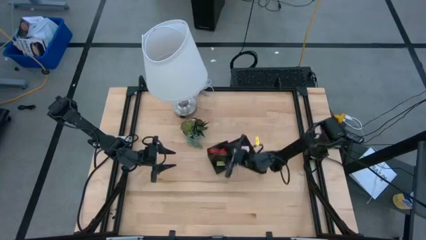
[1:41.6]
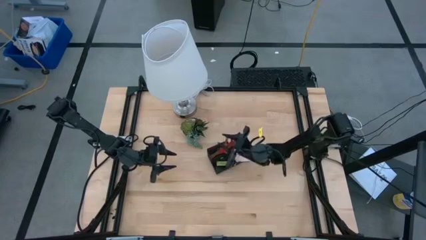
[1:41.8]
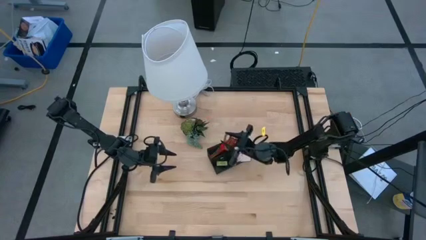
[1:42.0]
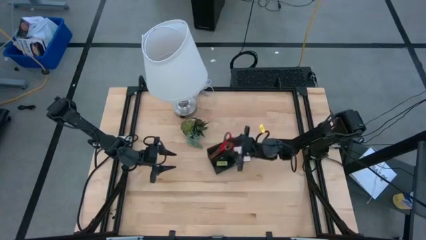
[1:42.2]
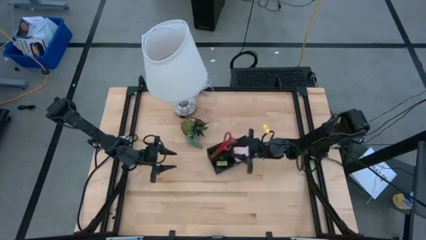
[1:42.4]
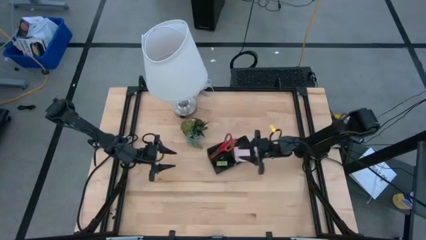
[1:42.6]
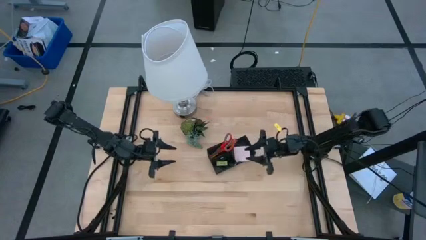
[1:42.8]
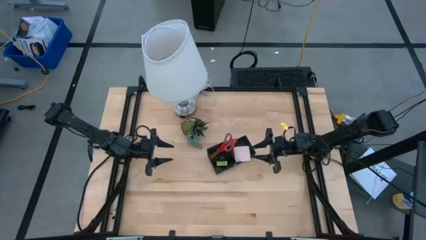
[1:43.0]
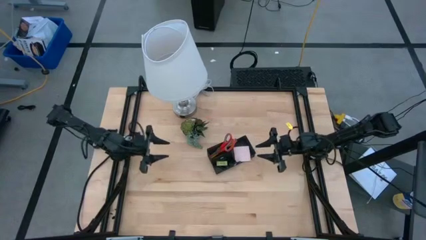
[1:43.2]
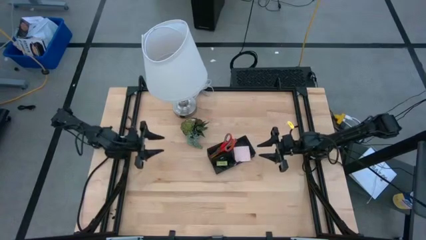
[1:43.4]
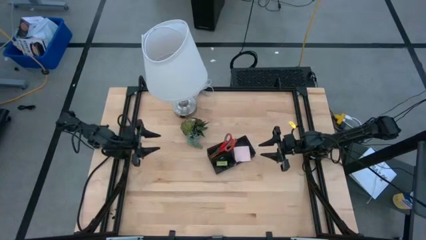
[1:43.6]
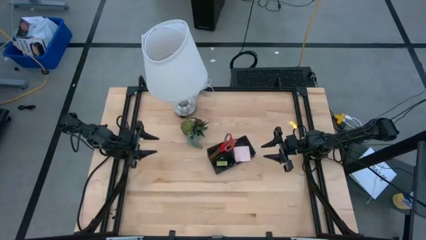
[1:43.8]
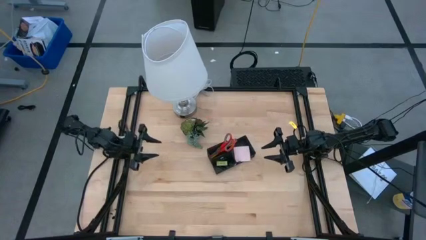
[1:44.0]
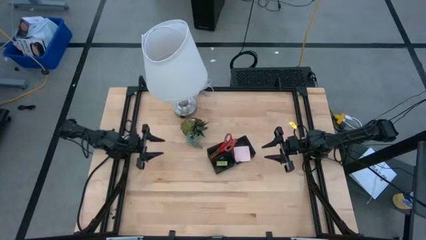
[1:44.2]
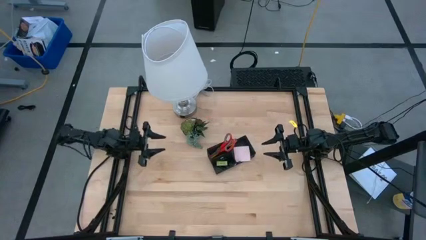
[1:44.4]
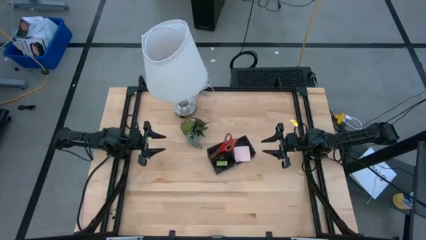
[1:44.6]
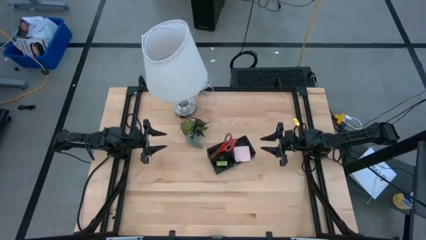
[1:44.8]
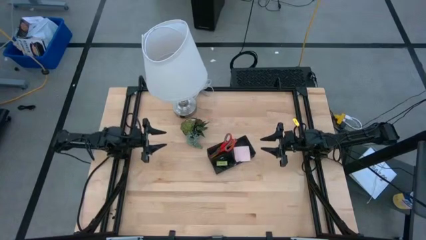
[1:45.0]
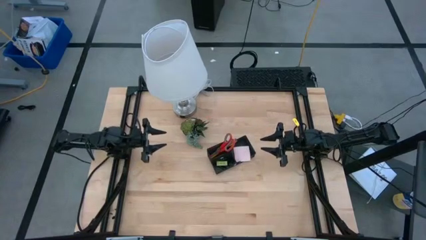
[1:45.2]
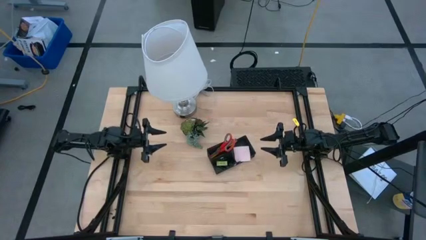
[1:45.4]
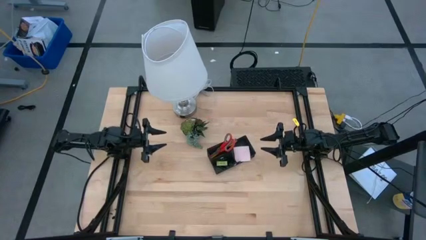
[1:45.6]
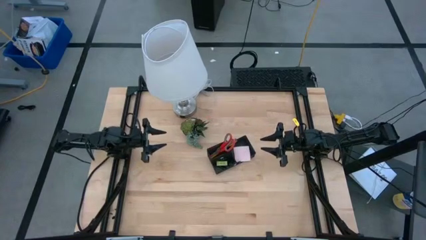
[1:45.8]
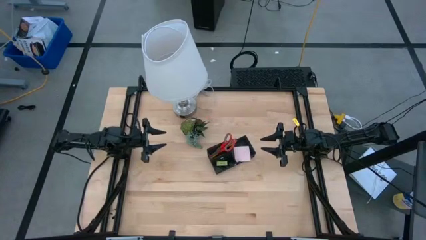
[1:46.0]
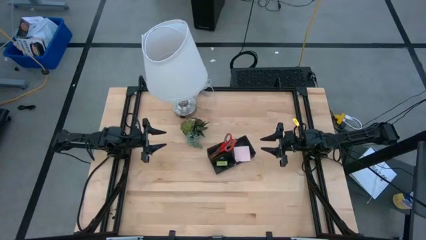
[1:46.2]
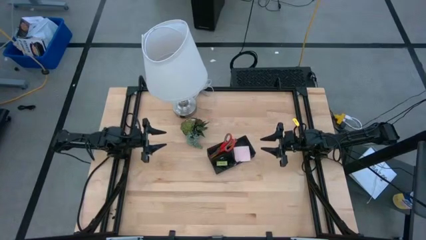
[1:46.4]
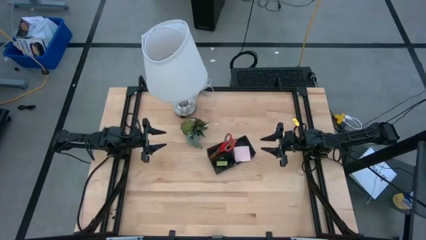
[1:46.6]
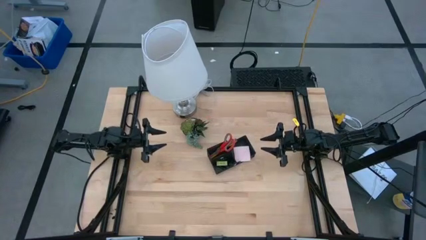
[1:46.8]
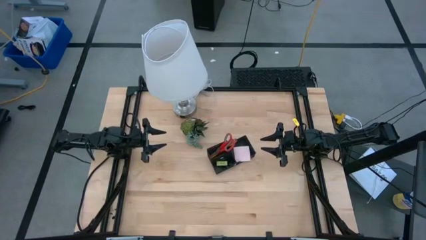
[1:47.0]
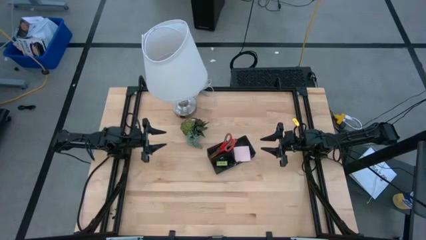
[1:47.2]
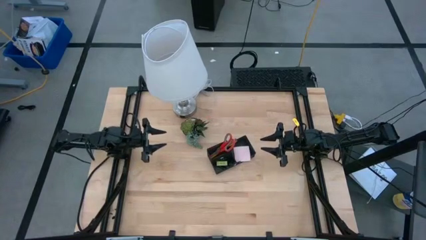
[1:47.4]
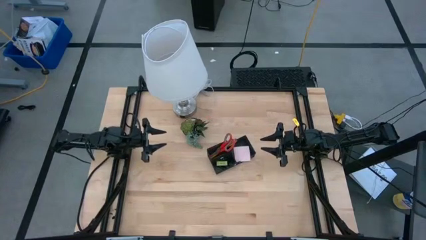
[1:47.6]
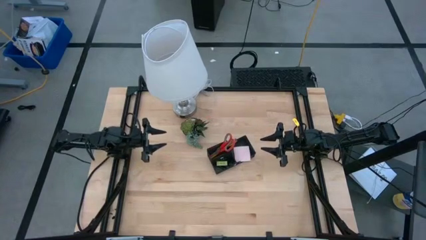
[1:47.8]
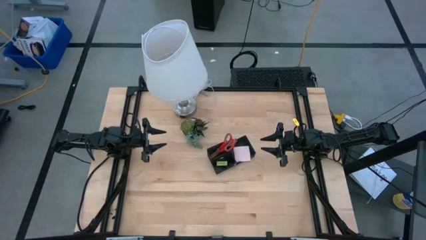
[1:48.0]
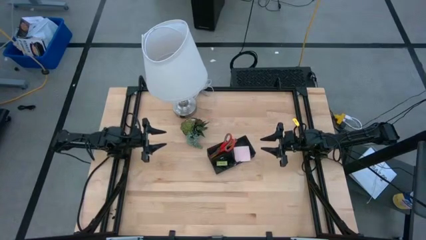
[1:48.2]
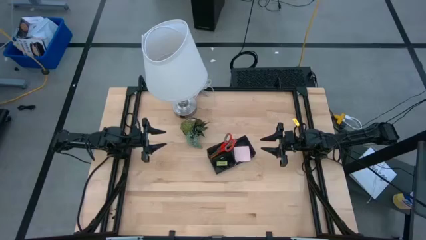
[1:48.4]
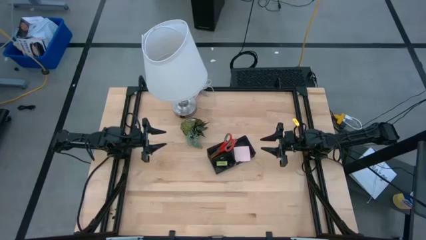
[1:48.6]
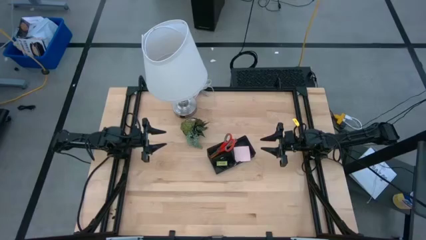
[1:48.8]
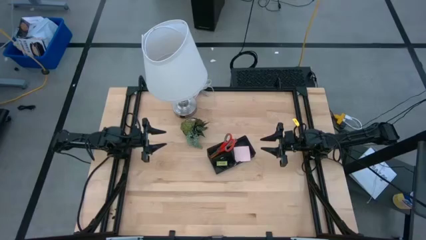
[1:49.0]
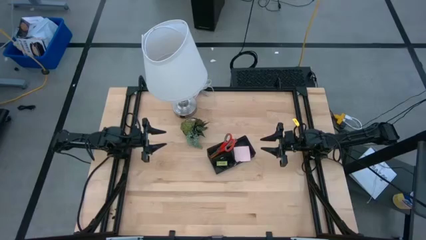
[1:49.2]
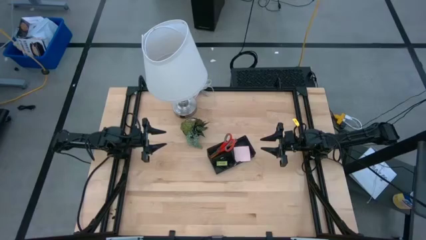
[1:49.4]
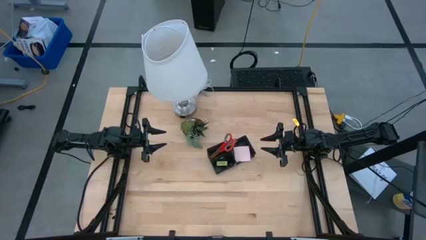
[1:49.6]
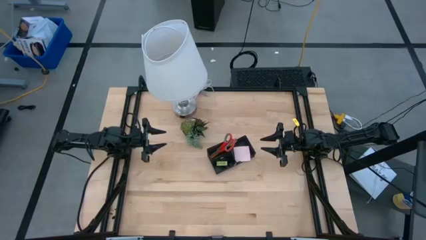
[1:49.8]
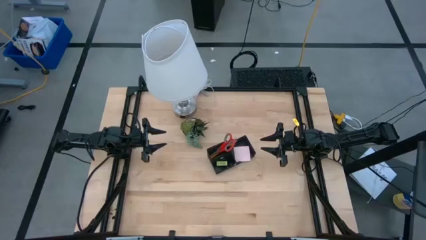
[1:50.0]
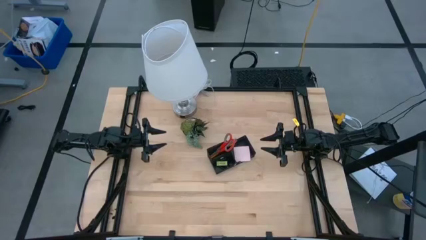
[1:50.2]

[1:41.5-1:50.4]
Task: Pick and place office supplies into organizer
Return to Home Position

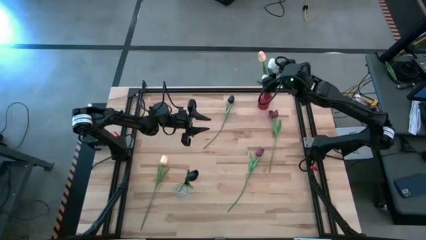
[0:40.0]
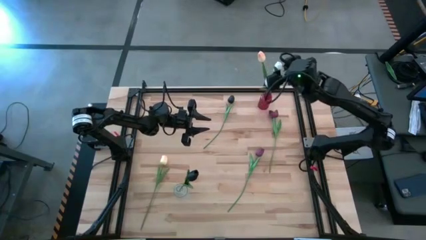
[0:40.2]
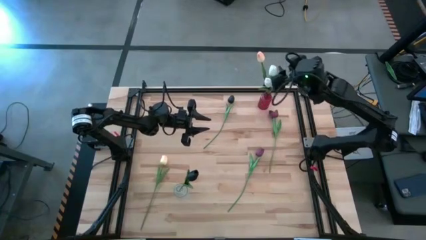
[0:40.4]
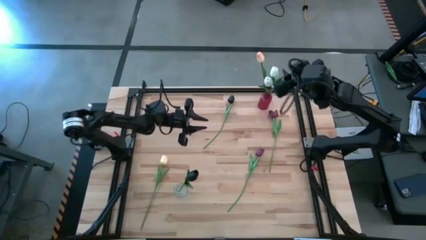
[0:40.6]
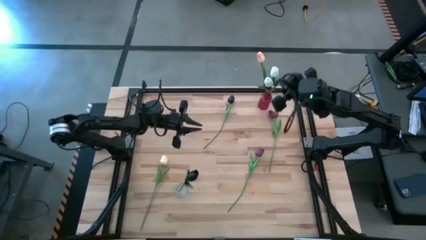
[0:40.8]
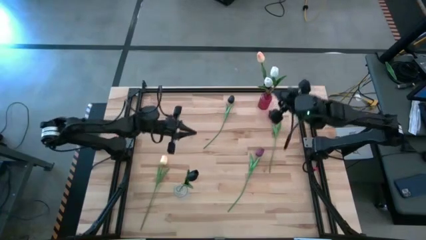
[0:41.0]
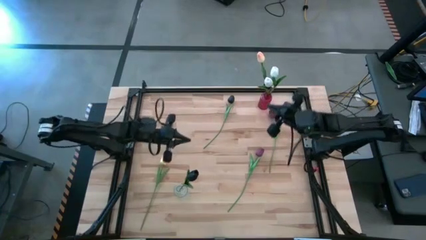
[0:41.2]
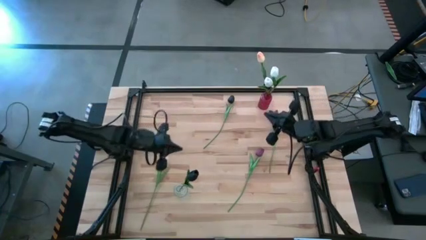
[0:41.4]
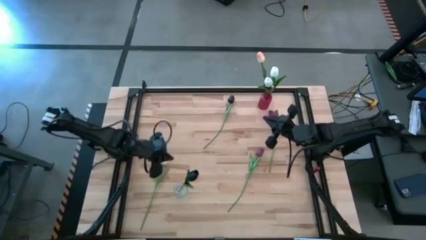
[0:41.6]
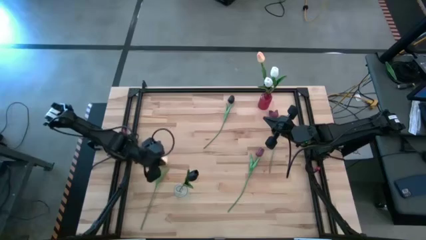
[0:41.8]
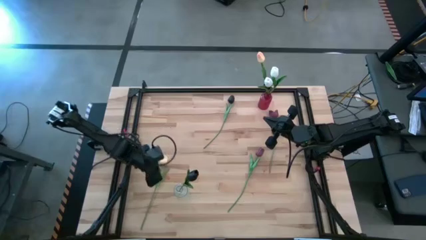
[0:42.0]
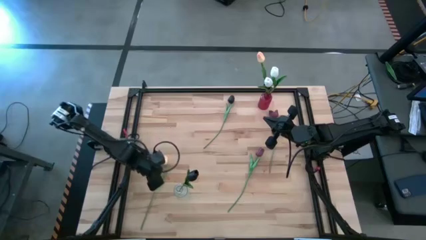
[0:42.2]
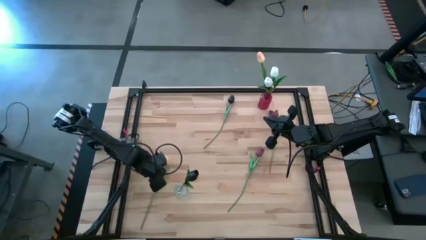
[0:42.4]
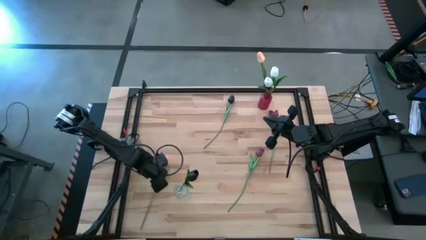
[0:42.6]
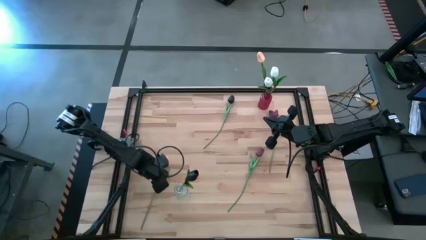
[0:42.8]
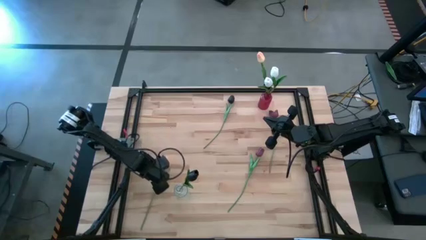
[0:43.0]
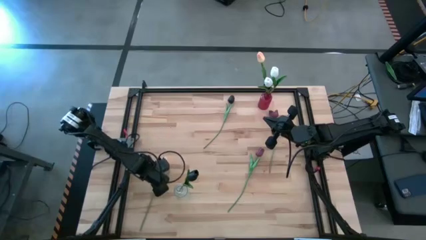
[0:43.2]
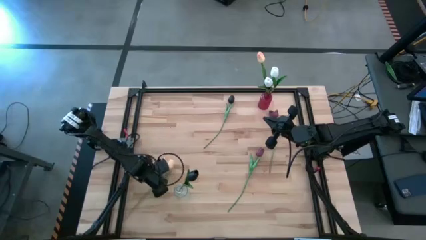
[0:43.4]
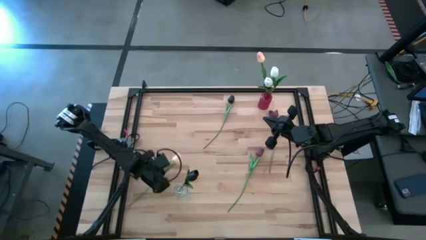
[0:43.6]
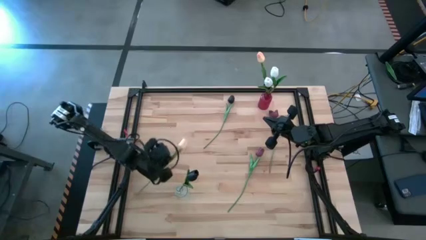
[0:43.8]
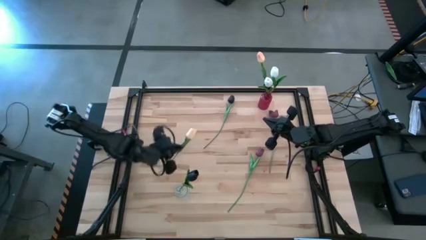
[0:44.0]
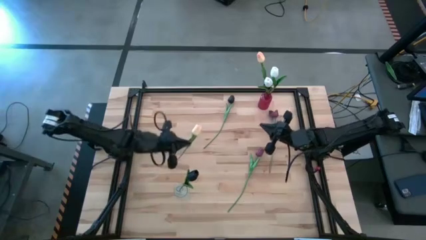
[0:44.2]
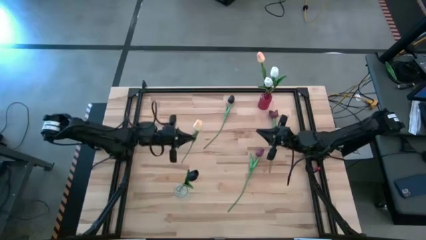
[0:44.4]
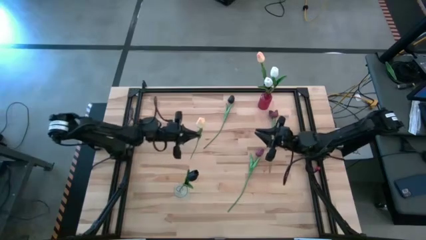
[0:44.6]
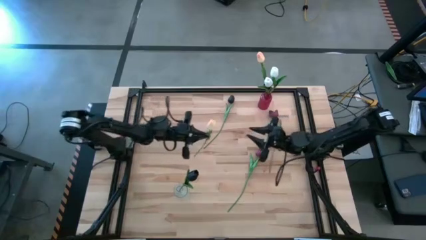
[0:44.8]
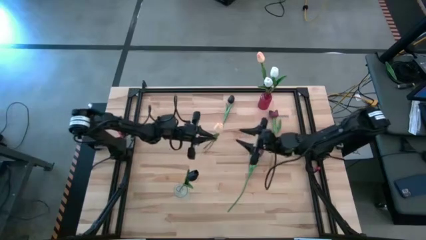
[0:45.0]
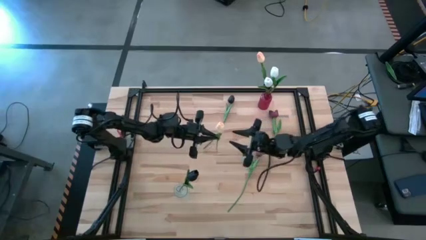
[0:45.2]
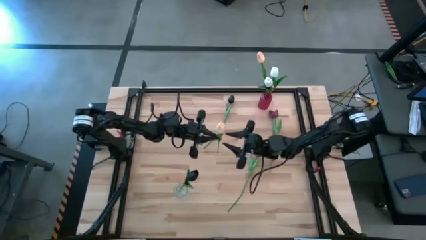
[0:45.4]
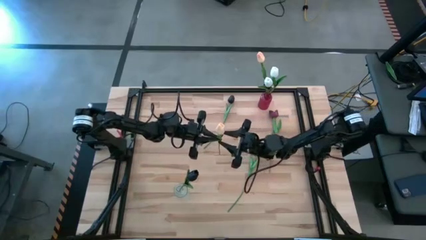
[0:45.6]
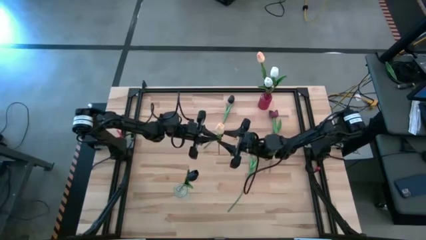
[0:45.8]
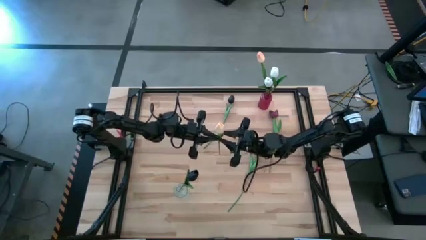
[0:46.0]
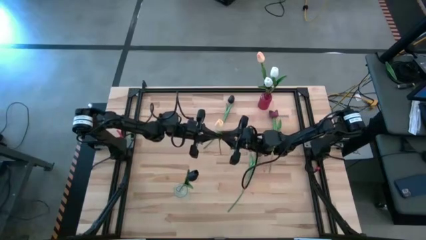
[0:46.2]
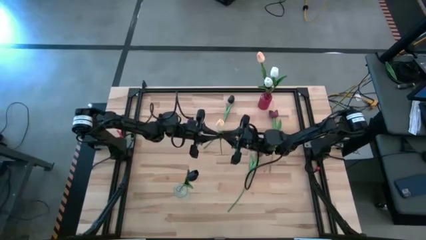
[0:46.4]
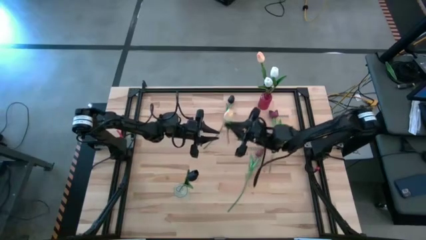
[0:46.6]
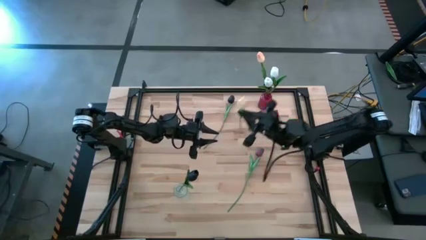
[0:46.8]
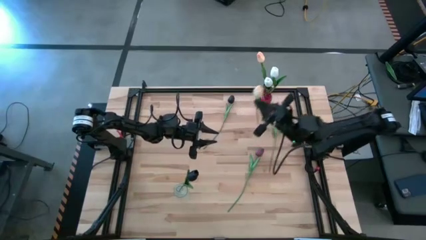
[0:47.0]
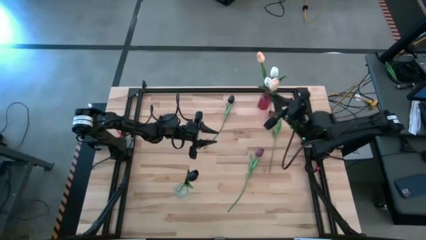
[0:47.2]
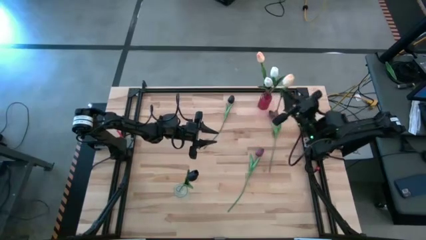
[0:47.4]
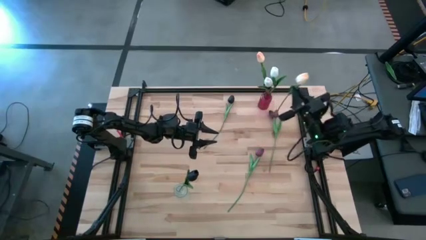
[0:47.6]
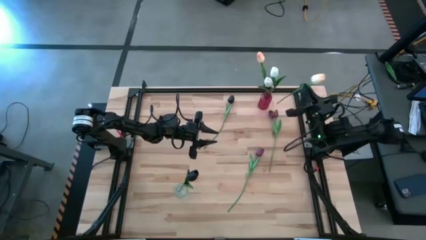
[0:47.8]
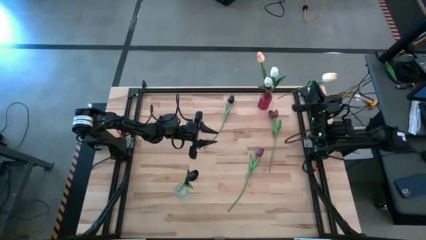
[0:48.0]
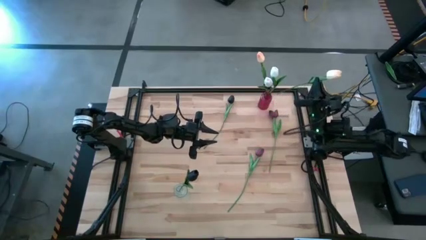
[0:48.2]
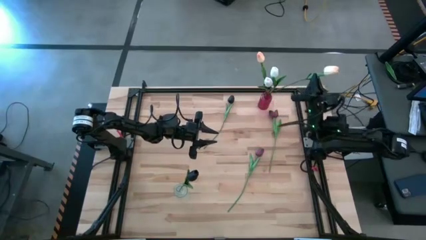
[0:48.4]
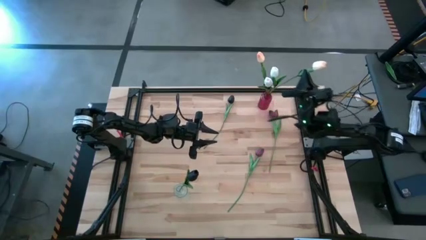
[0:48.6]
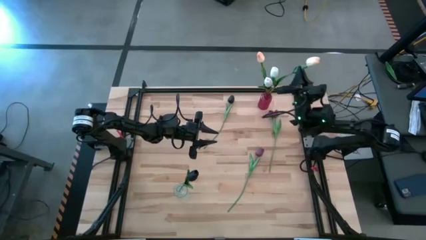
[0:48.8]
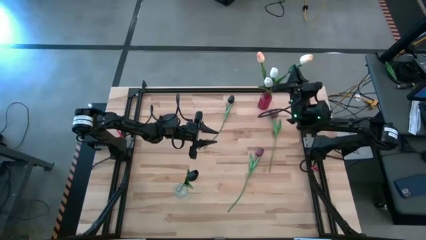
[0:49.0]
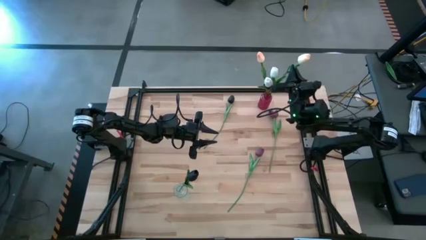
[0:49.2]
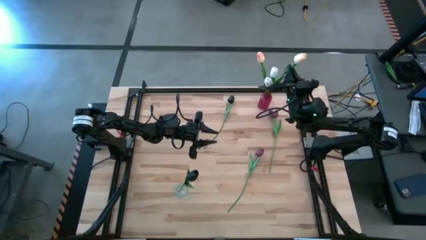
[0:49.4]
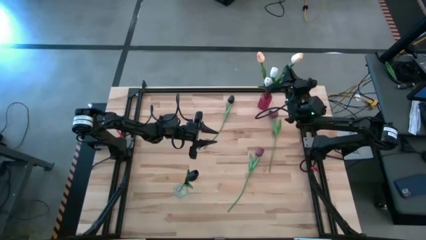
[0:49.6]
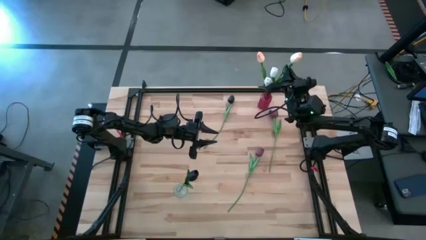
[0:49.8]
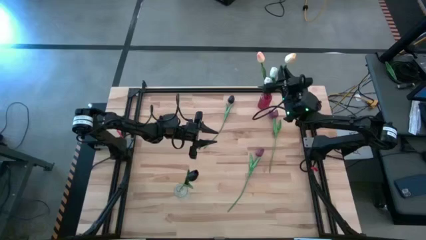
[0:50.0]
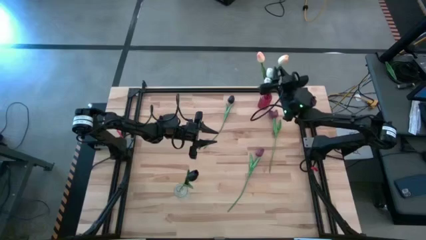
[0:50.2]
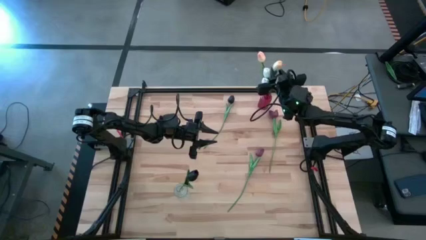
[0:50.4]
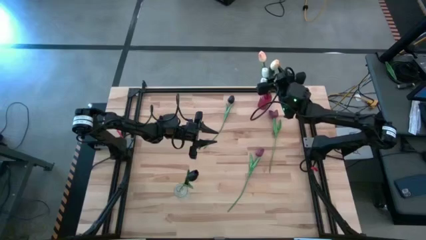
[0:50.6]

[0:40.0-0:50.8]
Task: Sort flowers into vase by color
Put the light yellow flower into the red vase
